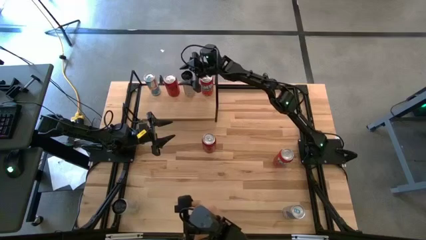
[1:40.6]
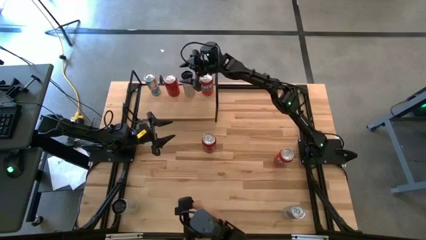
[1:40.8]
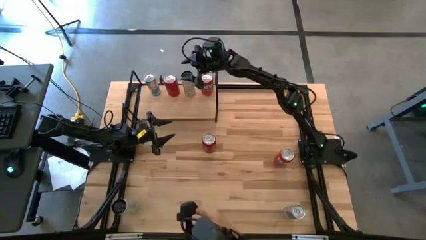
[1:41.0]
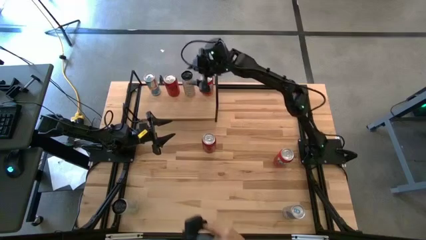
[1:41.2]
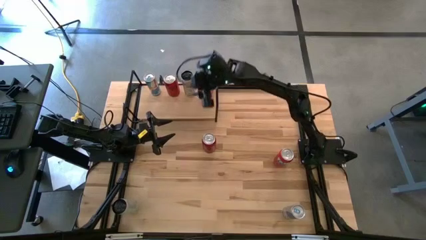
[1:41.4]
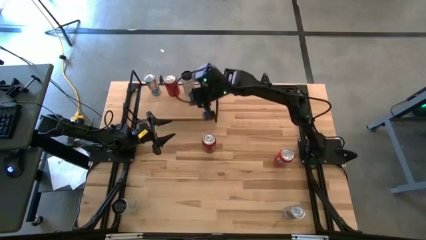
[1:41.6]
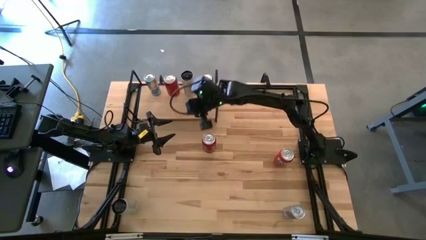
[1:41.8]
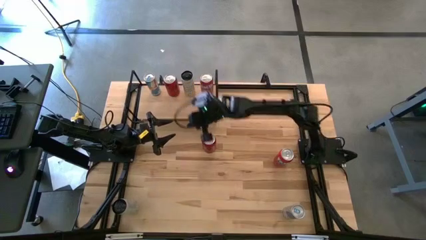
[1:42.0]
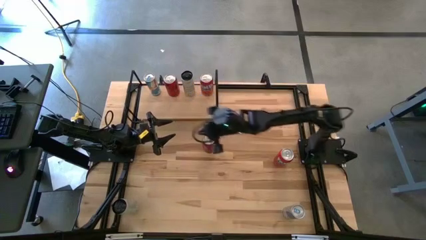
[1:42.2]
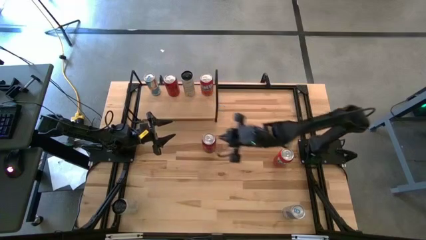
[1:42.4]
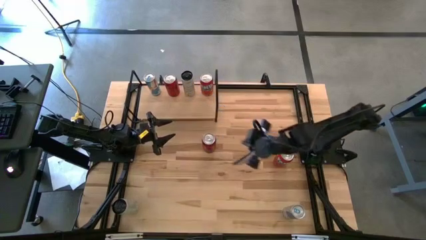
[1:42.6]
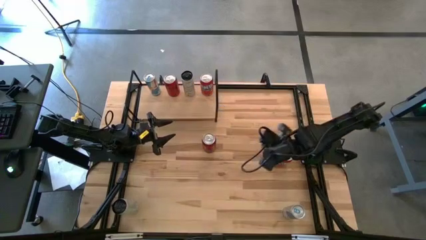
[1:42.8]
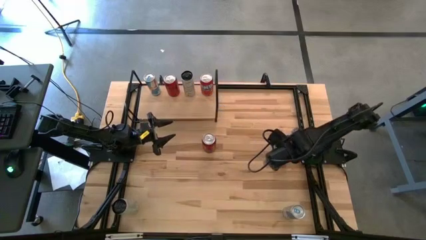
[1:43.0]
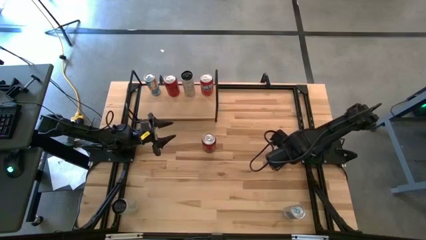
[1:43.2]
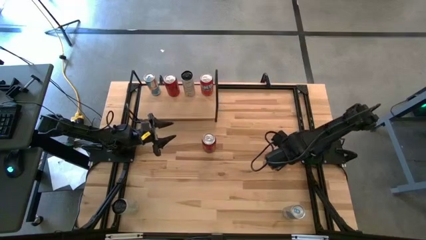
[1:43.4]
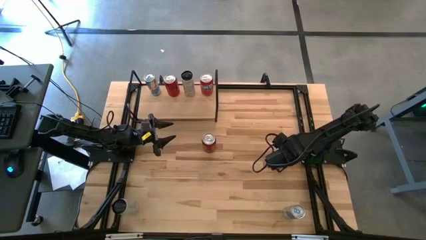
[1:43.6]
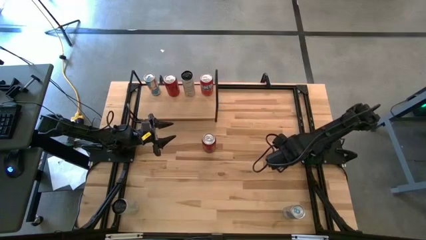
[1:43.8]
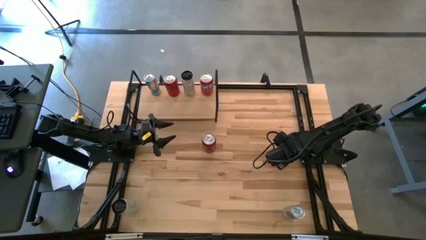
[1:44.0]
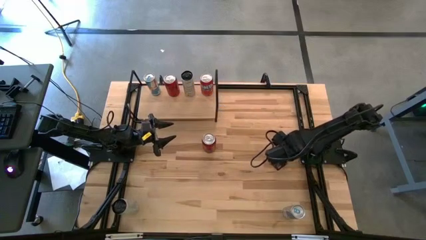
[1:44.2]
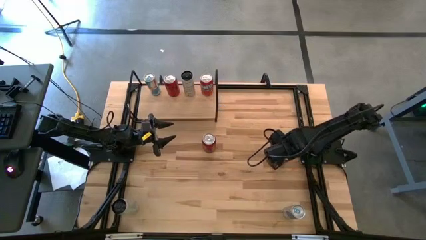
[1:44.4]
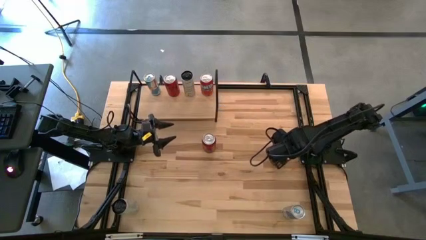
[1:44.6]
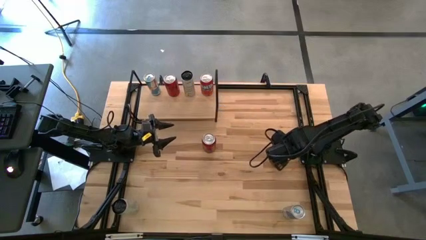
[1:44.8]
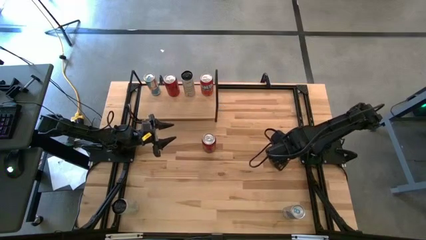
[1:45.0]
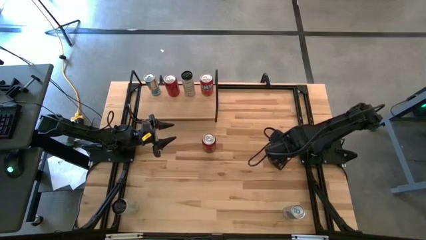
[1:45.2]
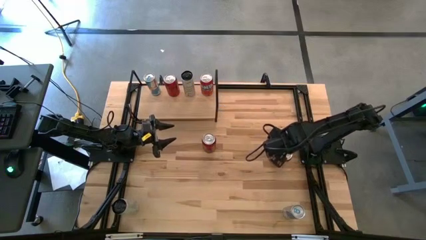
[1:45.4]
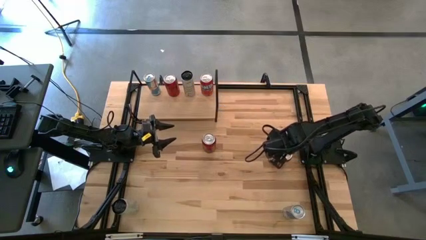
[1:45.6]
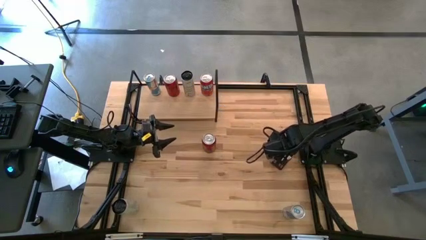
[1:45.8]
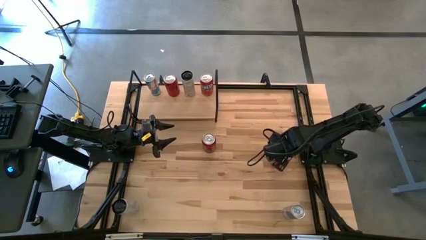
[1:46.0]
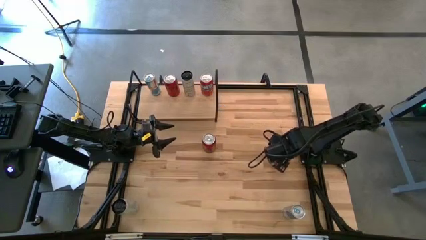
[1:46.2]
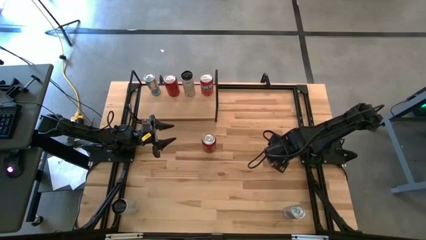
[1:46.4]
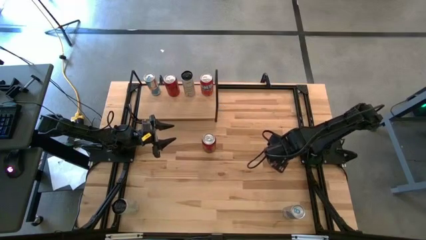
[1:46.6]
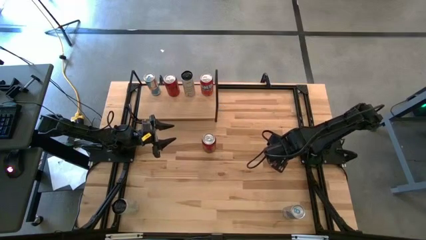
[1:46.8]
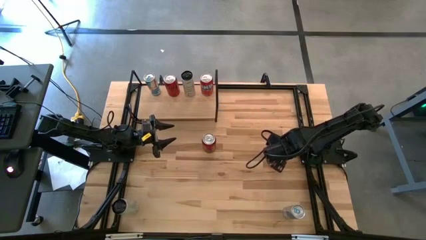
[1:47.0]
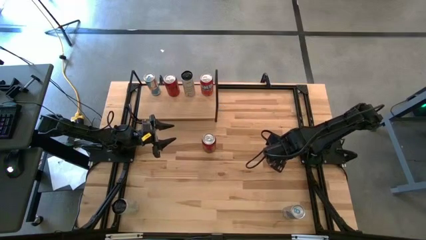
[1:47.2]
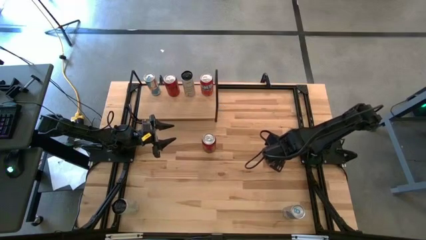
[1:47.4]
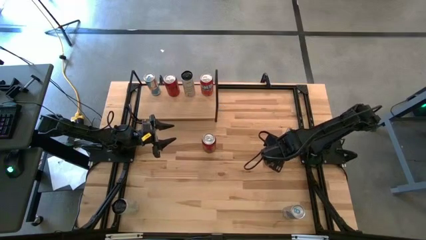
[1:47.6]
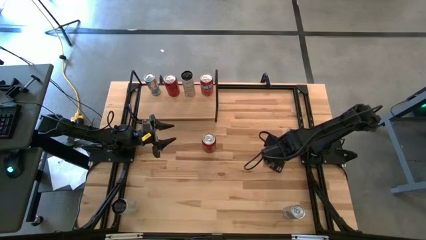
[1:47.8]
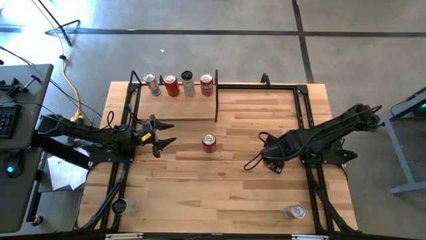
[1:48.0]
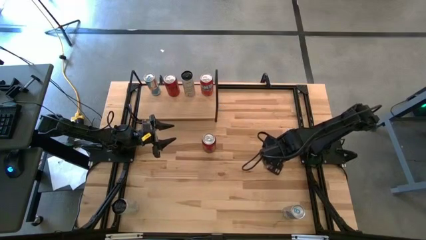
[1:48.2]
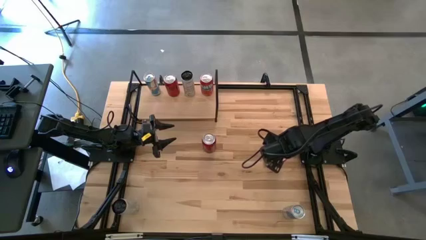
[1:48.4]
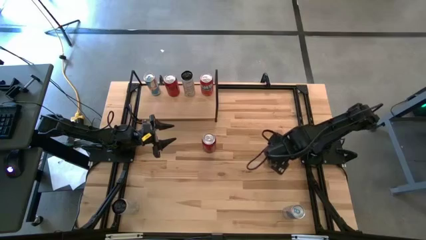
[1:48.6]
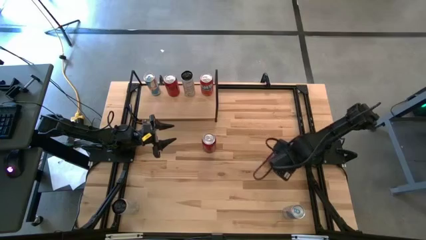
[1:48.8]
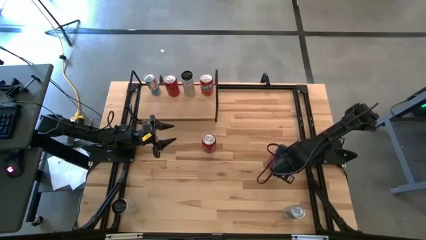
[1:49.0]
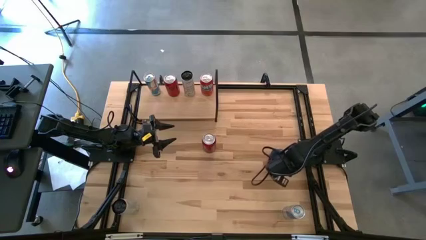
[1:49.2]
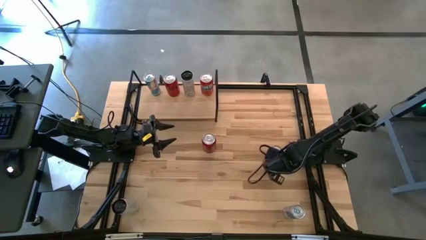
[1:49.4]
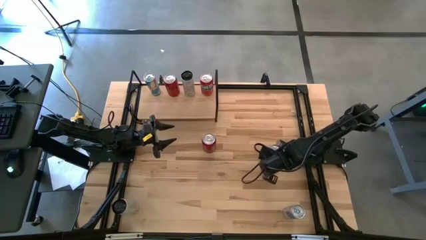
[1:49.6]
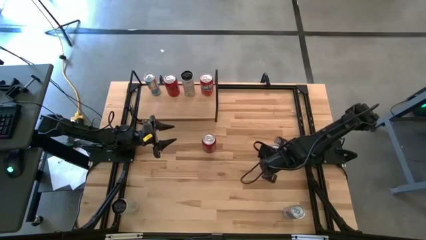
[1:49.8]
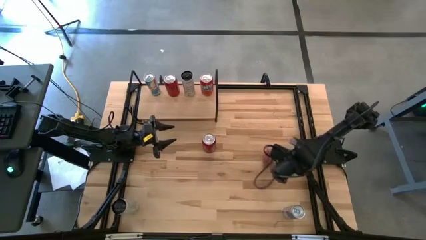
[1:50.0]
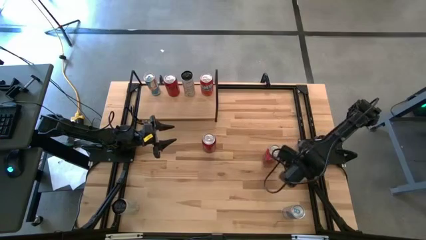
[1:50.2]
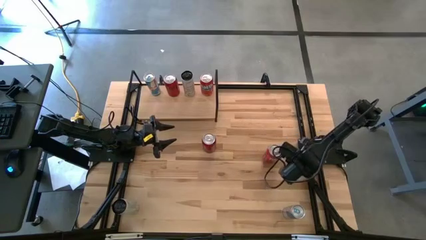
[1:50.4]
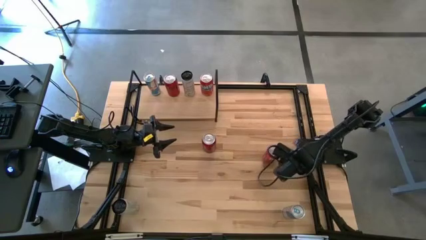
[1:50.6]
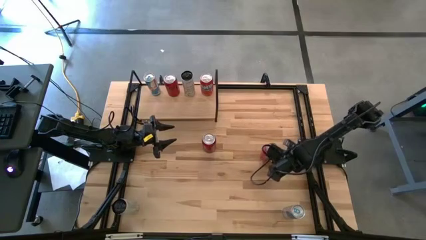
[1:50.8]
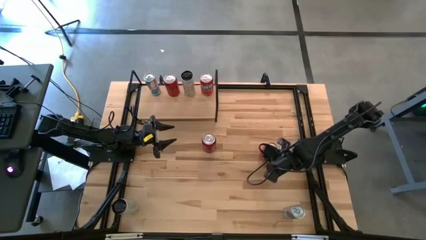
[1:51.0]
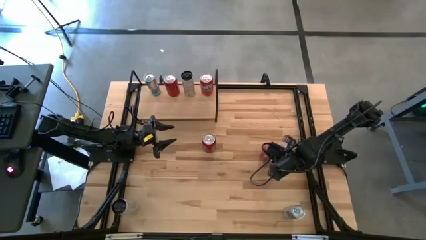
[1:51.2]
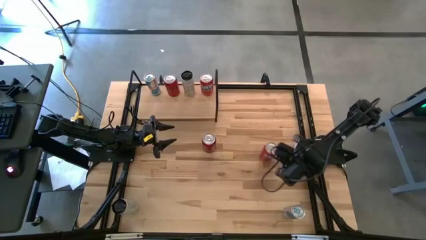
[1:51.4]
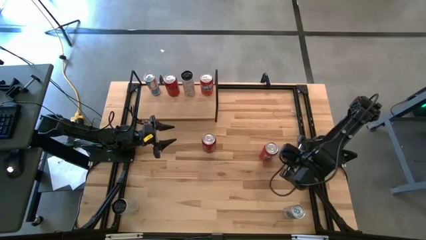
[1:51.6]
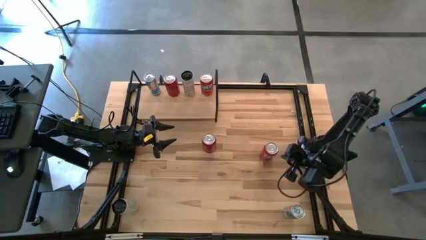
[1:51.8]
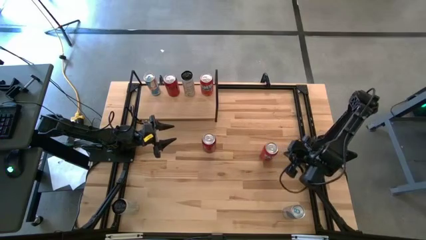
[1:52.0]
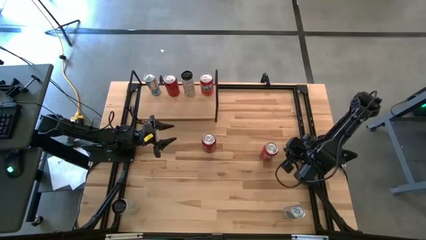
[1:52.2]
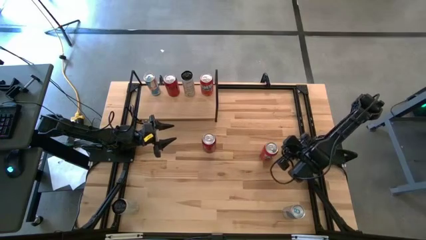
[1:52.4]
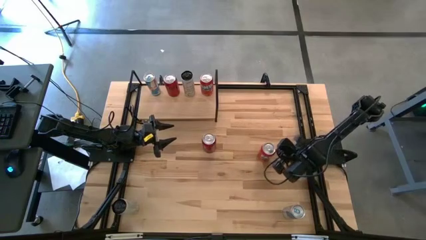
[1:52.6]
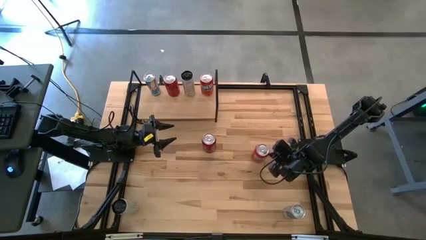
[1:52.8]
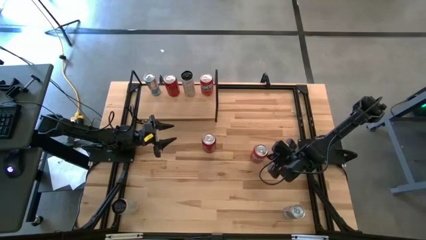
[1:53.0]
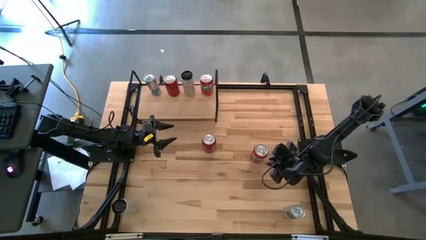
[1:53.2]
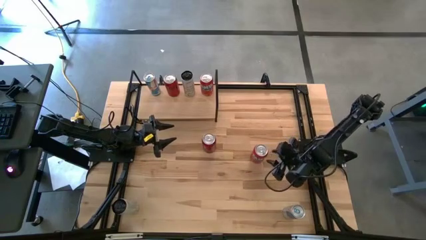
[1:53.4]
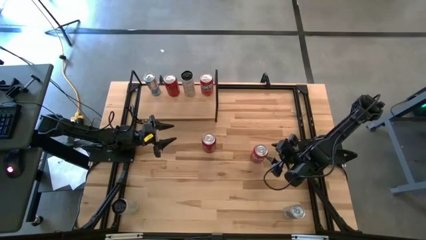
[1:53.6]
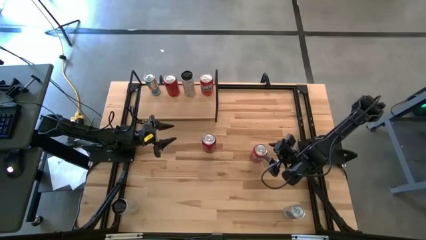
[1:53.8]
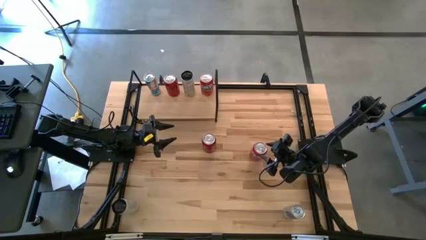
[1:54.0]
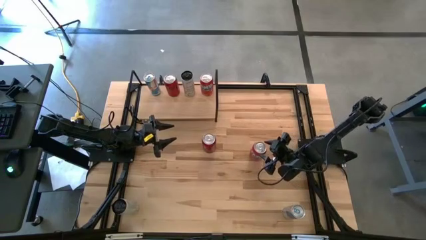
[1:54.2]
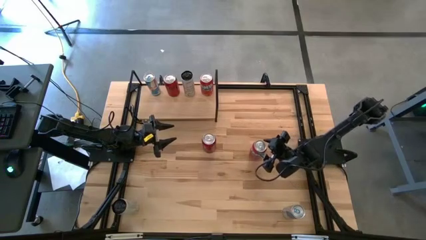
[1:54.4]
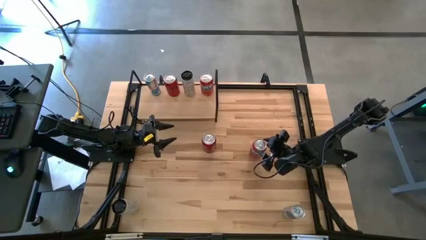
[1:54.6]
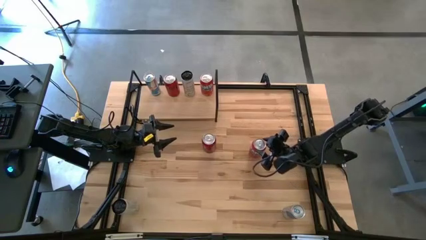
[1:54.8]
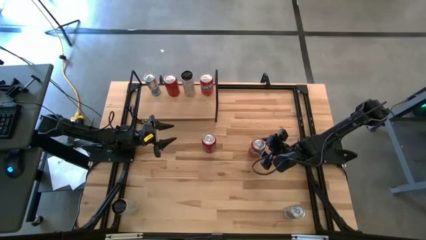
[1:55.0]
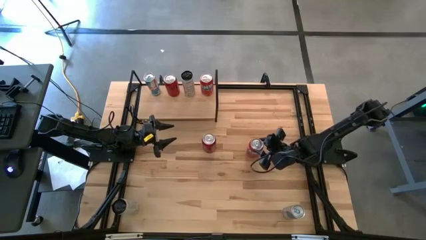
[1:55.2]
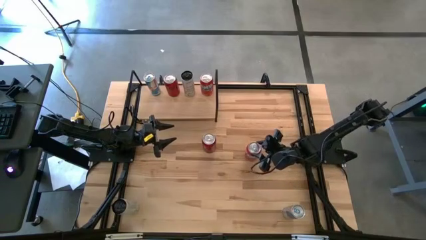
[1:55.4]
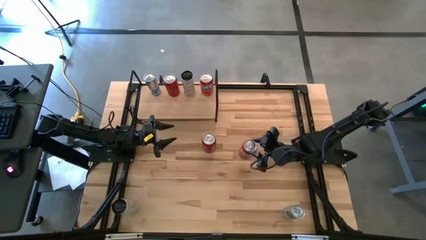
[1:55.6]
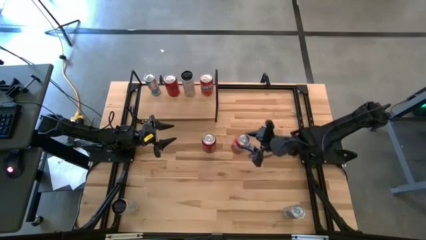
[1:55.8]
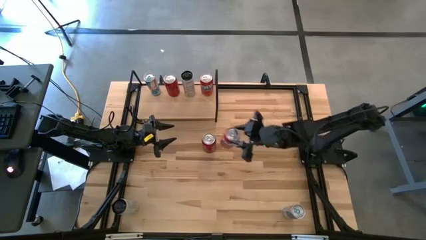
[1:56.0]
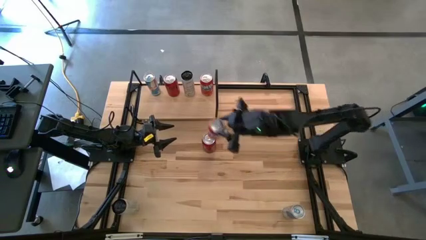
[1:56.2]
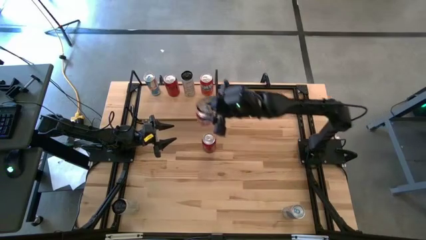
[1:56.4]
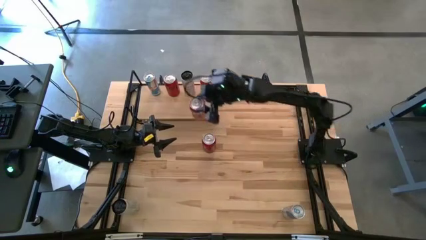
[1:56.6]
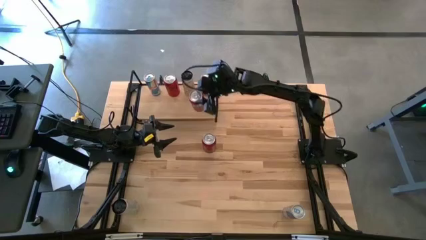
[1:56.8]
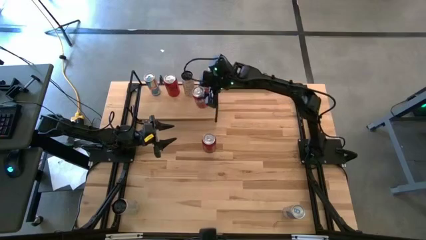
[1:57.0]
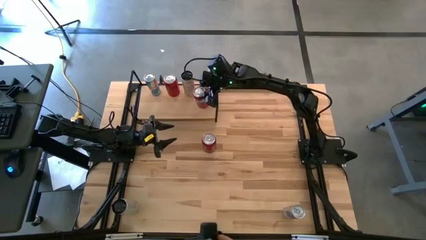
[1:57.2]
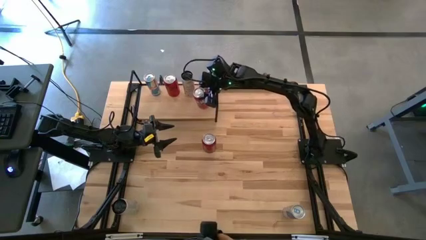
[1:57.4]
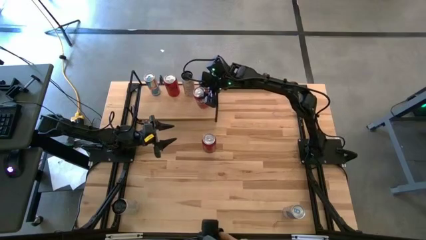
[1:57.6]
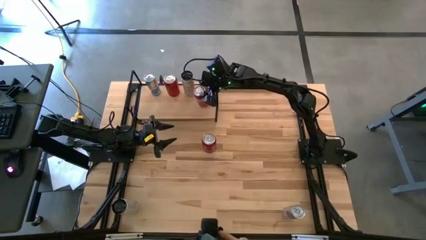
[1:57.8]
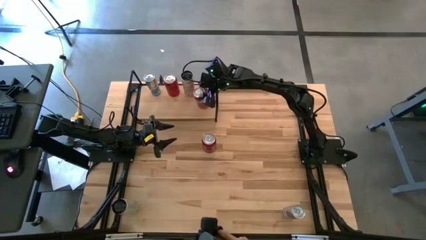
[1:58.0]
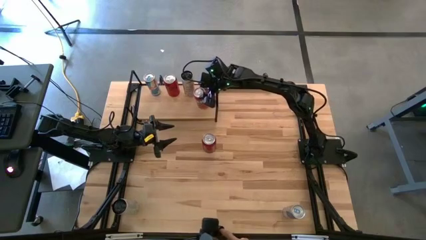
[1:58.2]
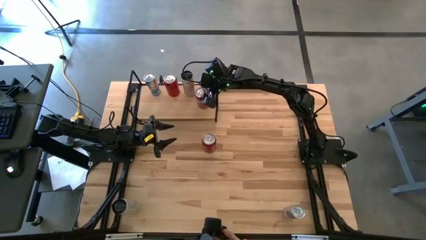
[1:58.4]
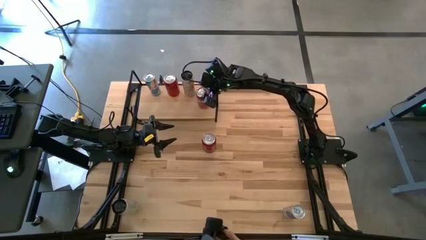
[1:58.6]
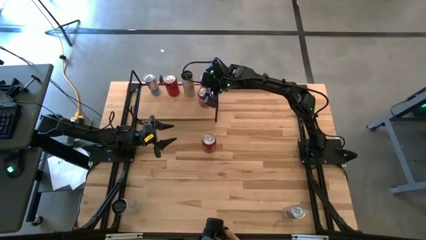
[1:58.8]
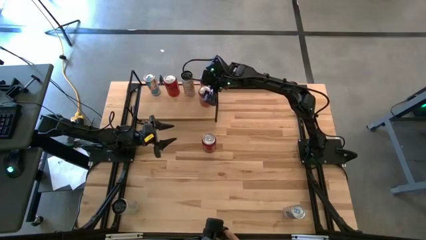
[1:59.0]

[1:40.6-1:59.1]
Task: Place canned beverage on shelf
Put the red soda can aligned with the other red soda can on the shelf
